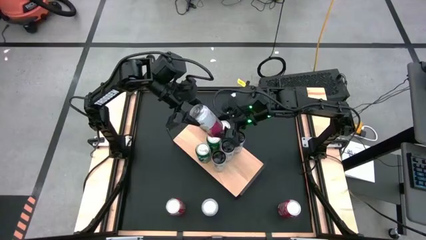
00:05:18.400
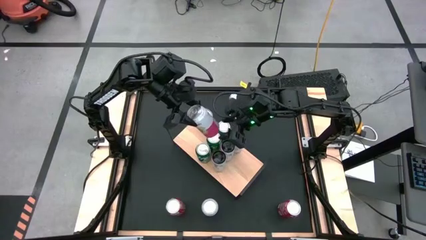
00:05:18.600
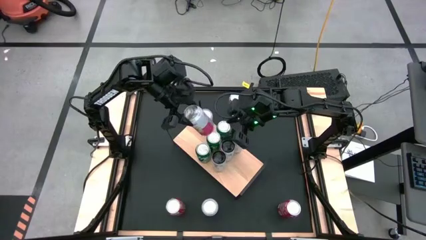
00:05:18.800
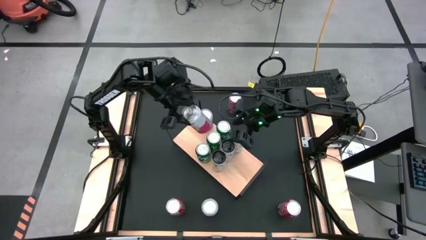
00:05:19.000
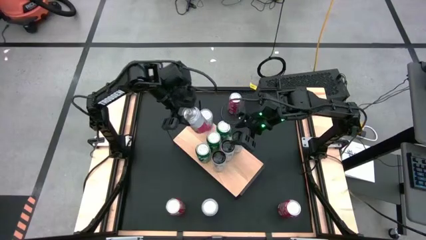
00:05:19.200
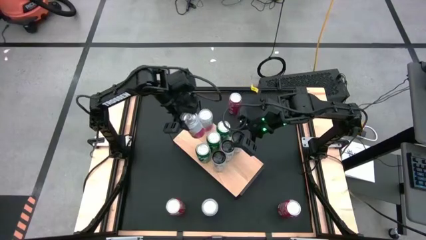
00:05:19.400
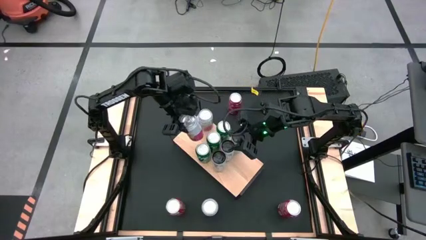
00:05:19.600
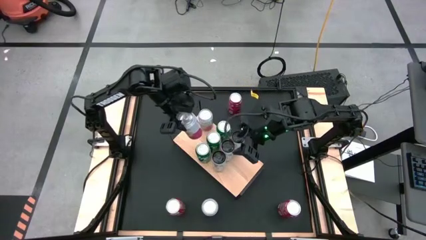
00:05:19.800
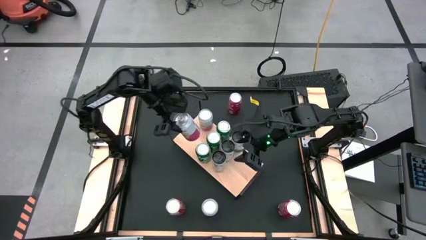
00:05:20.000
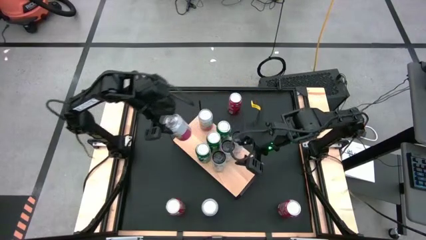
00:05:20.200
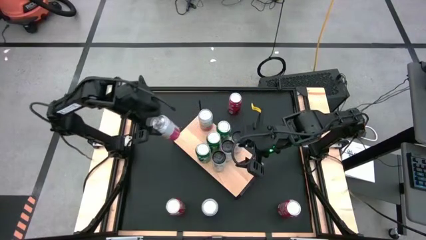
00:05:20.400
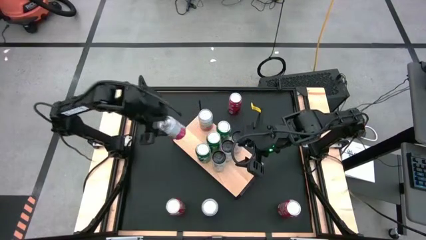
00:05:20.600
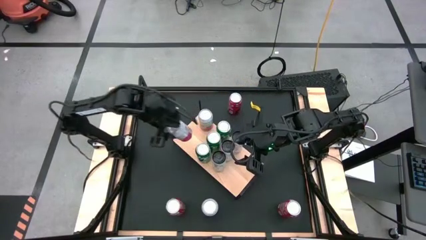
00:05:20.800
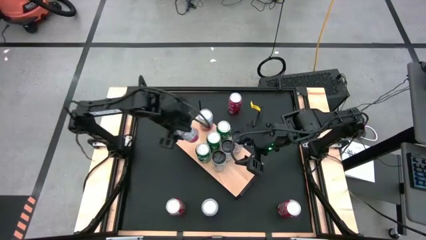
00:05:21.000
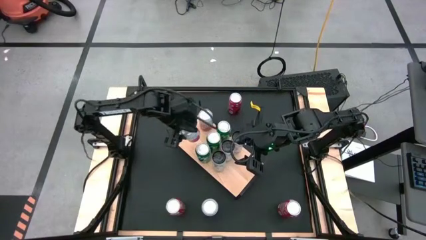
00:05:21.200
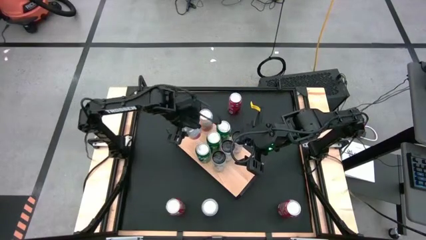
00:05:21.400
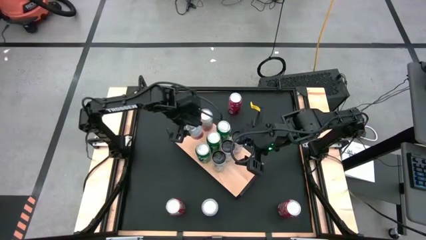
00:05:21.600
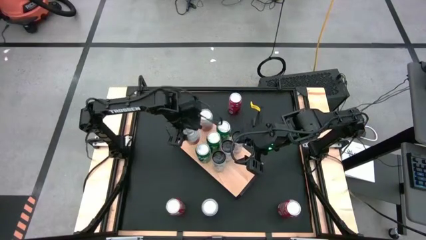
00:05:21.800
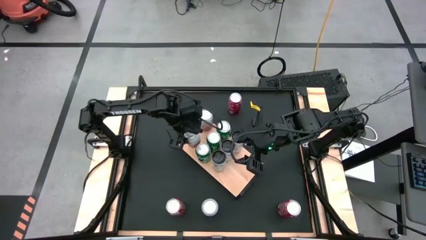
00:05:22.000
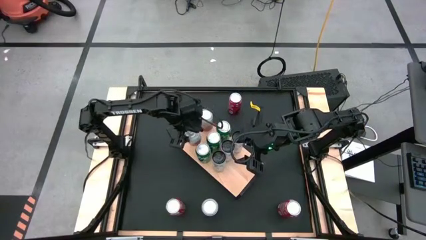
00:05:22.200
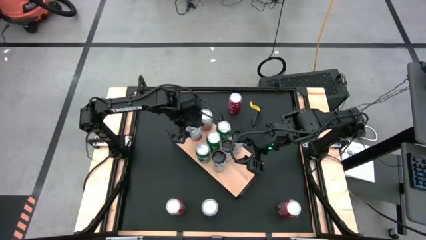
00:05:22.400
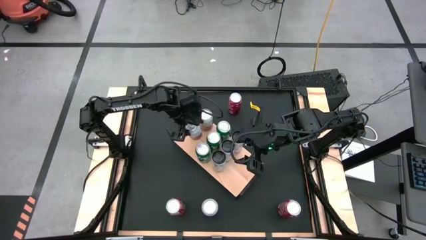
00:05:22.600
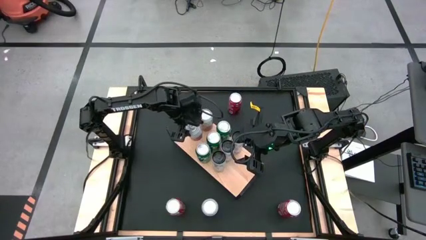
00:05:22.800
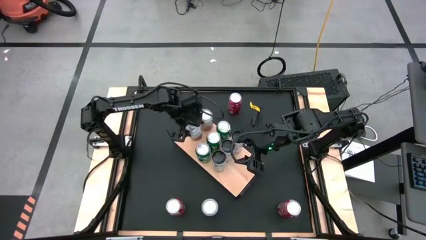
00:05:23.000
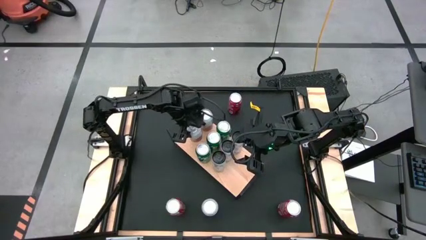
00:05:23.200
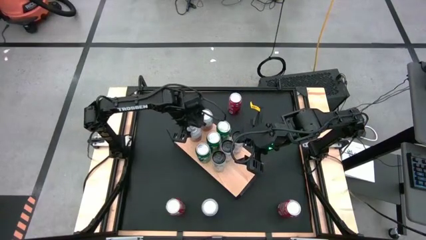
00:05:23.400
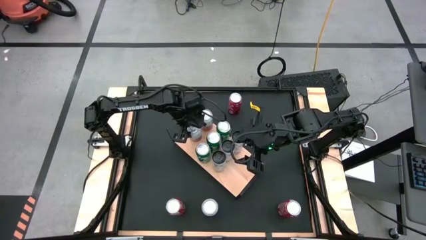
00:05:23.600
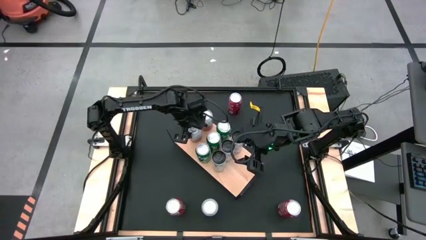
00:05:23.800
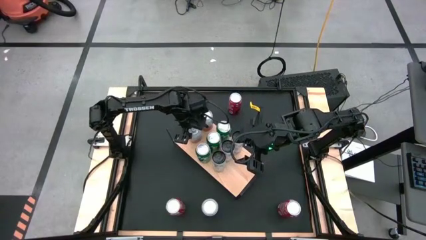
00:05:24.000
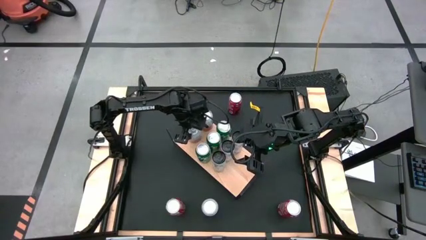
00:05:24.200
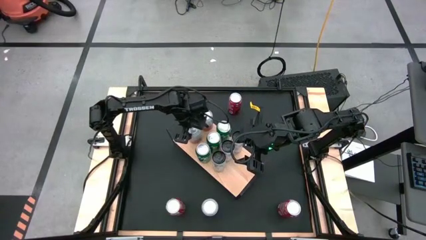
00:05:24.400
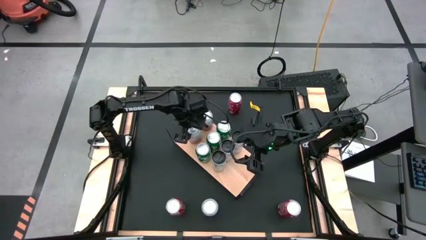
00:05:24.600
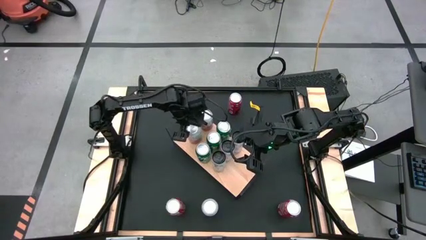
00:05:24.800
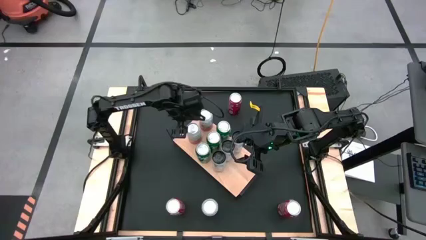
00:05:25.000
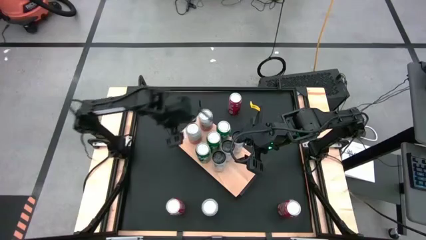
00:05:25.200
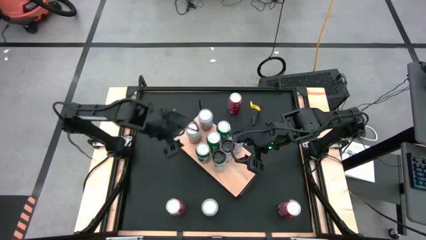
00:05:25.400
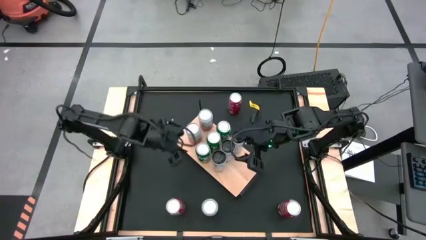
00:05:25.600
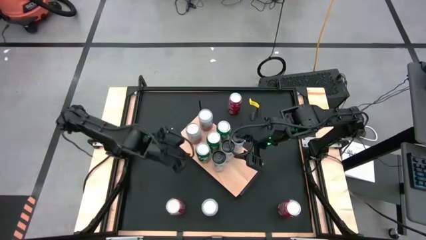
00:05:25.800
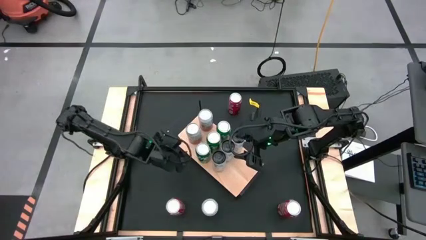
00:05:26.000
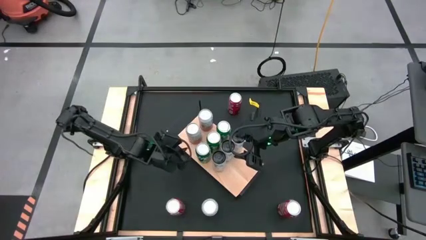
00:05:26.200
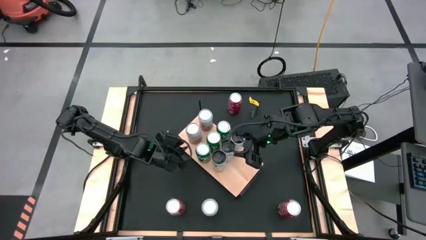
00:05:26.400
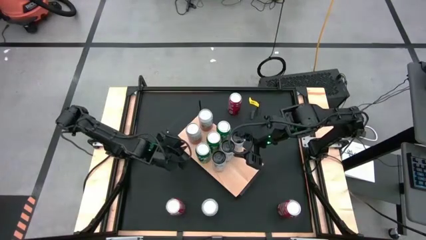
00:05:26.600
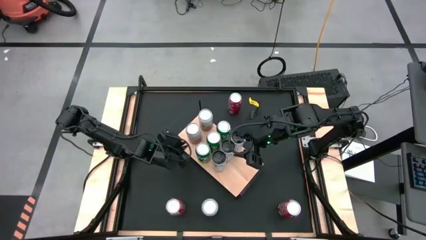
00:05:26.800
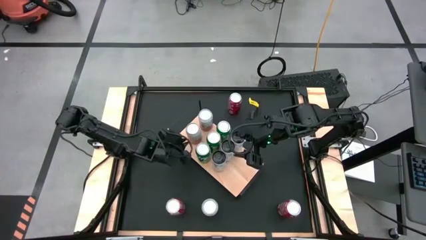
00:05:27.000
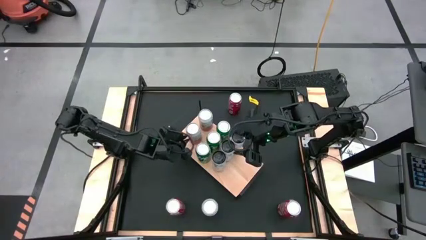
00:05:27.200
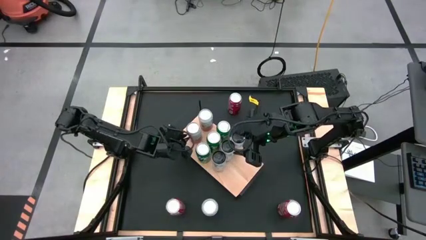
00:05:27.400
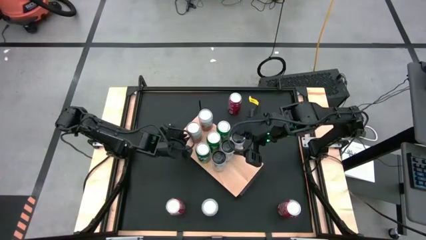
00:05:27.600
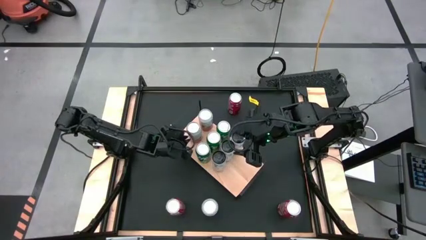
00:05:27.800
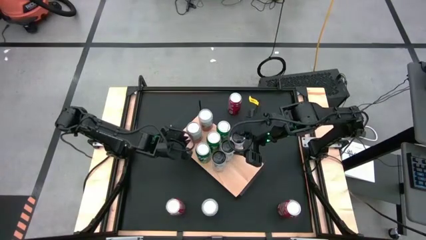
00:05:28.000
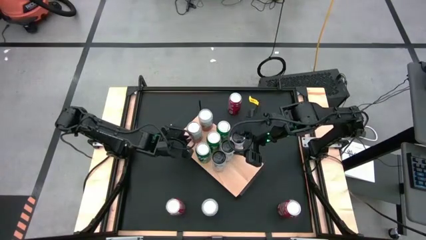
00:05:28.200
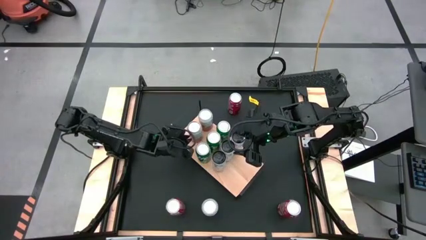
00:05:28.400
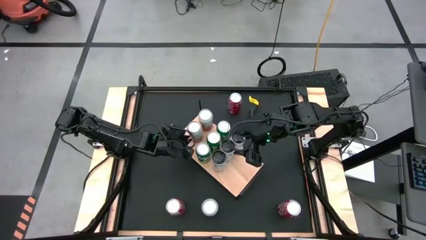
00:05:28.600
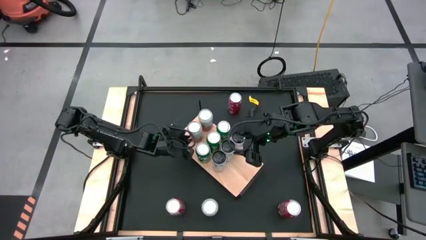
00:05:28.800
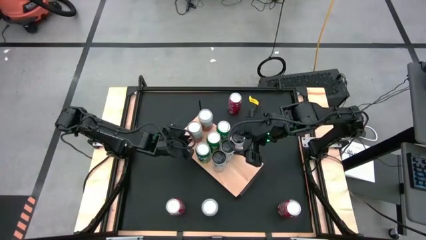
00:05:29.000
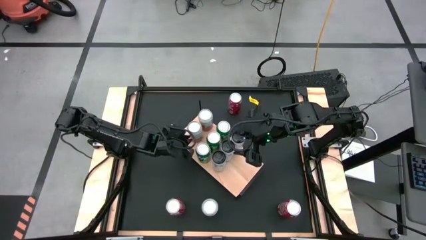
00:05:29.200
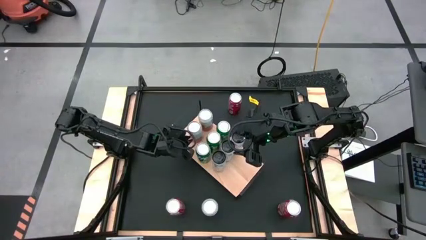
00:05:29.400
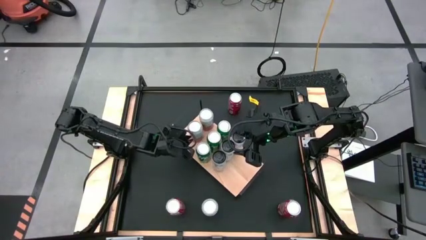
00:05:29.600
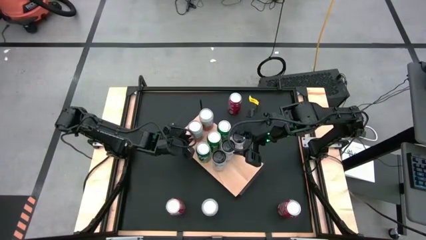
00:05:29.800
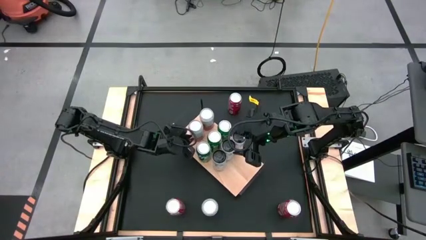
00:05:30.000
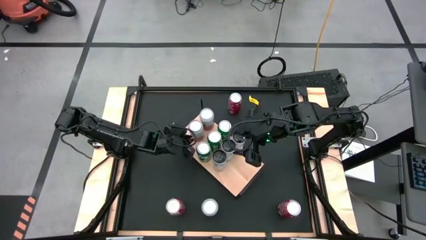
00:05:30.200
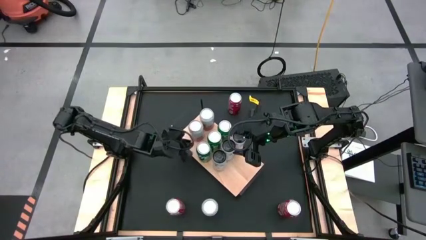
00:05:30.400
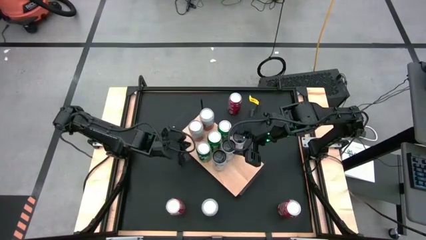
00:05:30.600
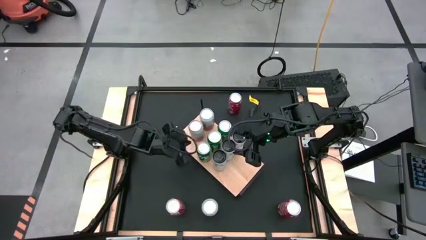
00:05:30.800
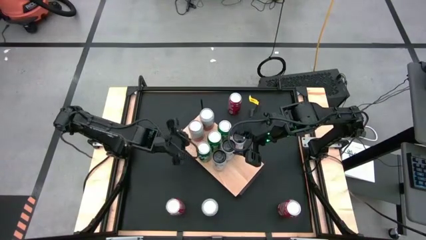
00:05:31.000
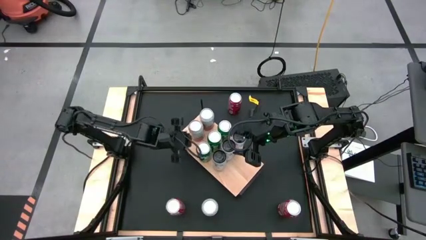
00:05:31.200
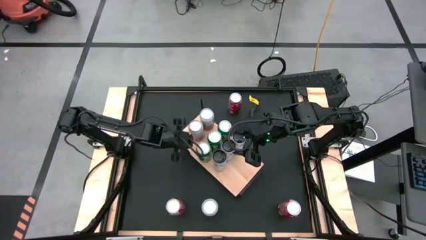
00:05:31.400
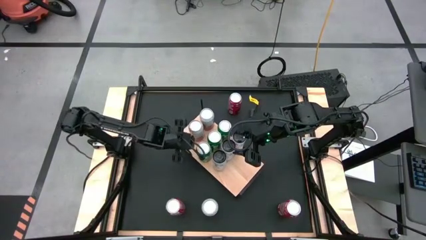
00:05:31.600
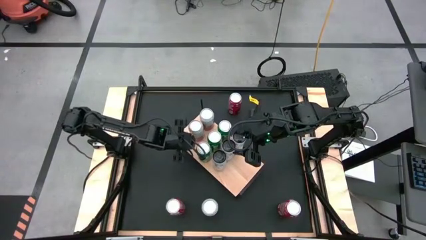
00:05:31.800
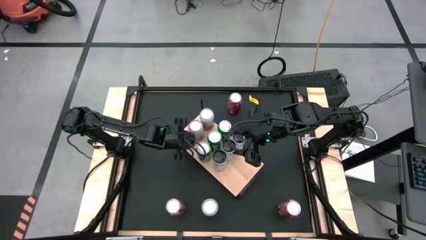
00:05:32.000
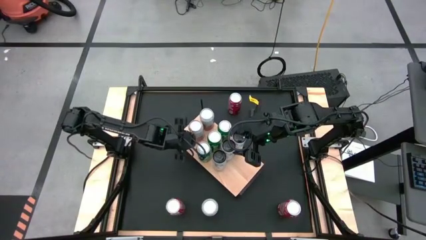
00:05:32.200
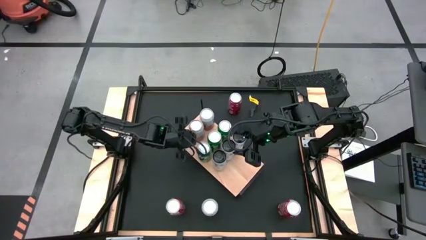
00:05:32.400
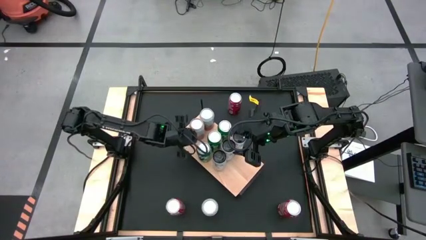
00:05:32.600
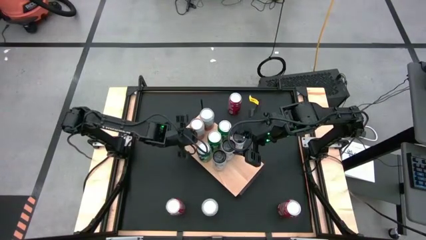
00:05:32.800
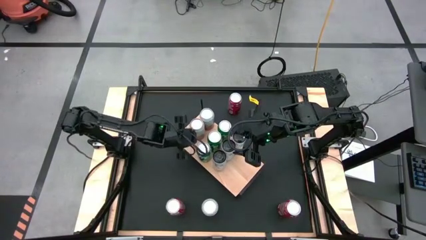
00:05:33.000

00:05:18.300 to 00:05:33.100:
Task: Place canned beverage on shelf
Put the top white and pink soda can aligned with the other white and pink soda can
